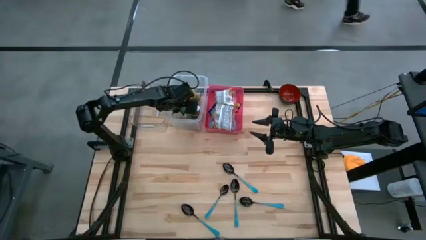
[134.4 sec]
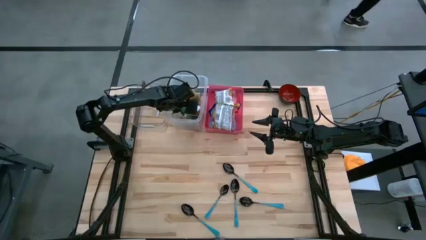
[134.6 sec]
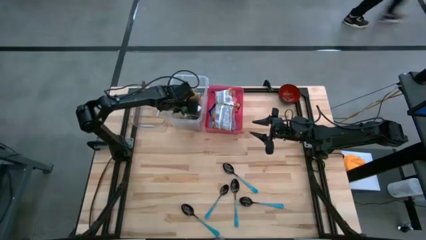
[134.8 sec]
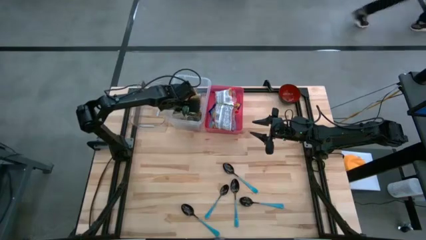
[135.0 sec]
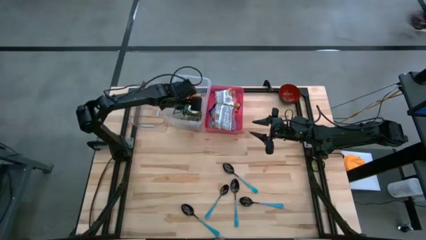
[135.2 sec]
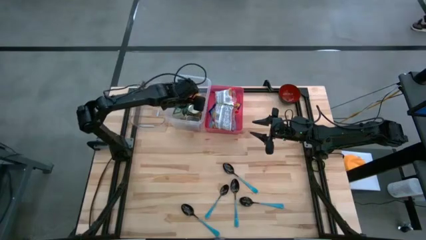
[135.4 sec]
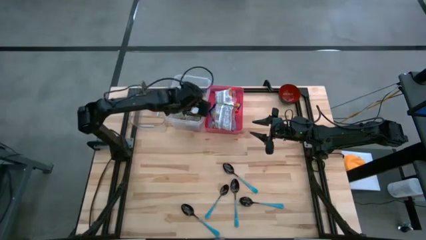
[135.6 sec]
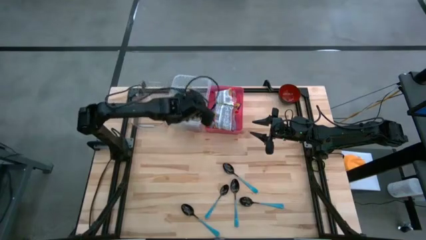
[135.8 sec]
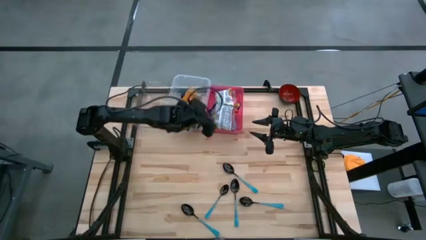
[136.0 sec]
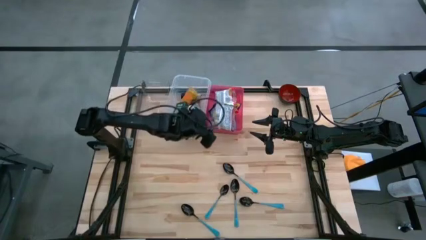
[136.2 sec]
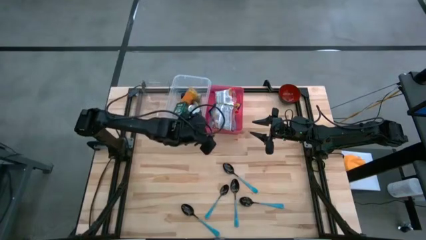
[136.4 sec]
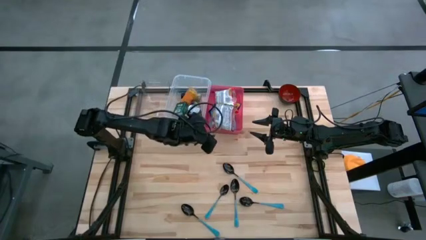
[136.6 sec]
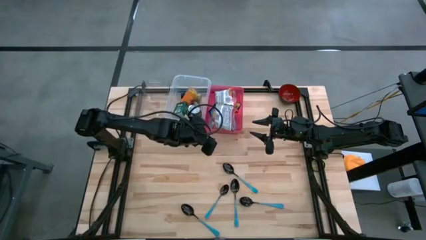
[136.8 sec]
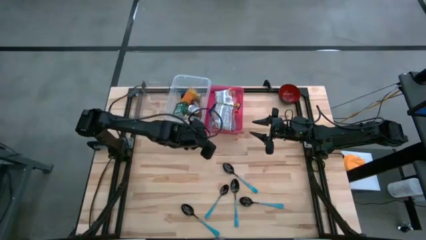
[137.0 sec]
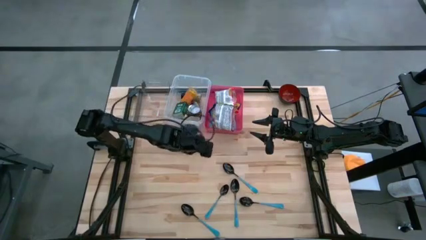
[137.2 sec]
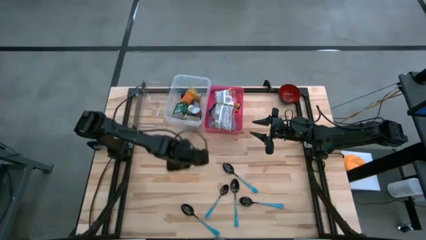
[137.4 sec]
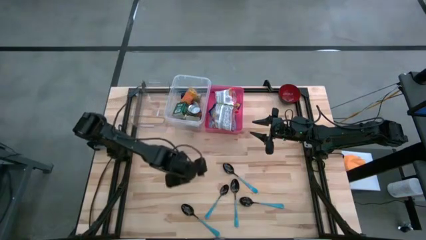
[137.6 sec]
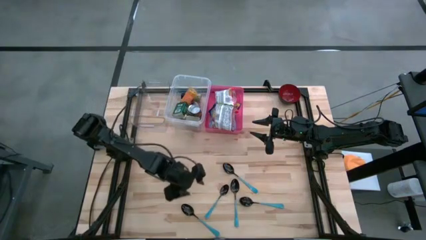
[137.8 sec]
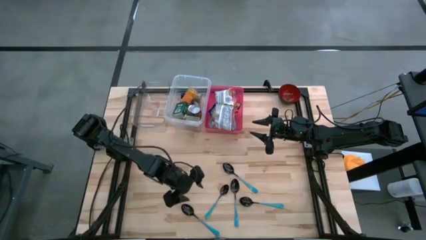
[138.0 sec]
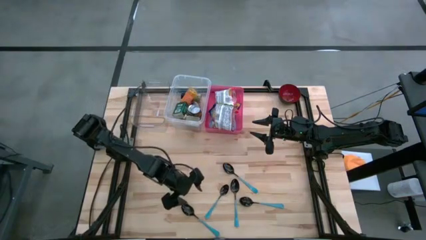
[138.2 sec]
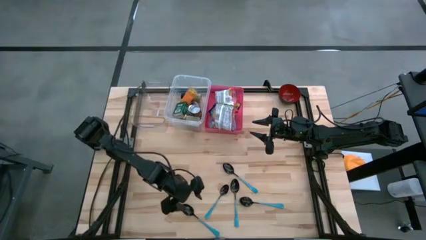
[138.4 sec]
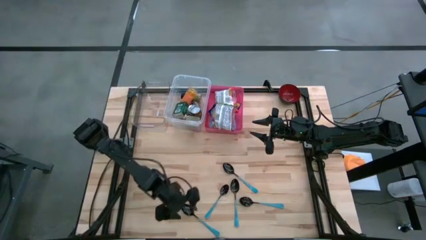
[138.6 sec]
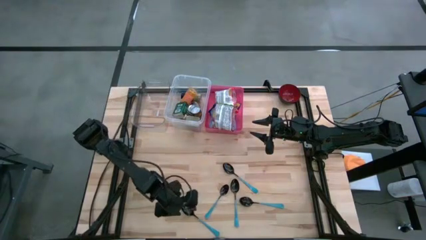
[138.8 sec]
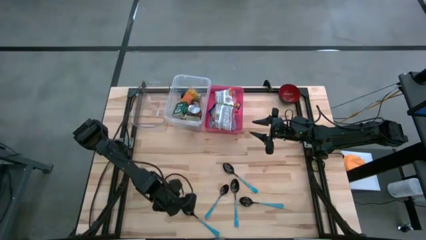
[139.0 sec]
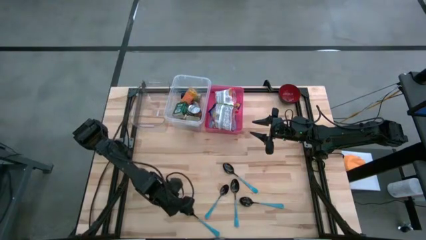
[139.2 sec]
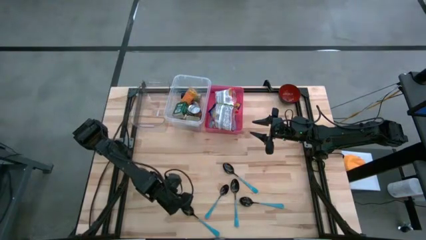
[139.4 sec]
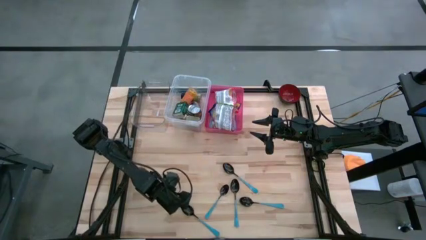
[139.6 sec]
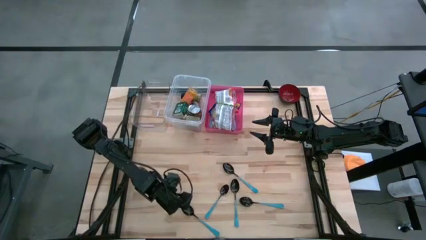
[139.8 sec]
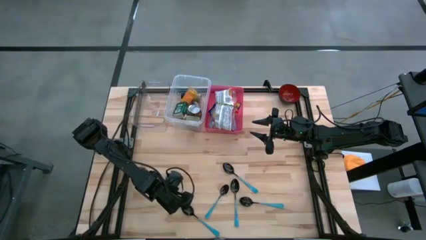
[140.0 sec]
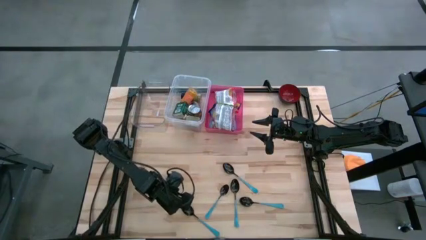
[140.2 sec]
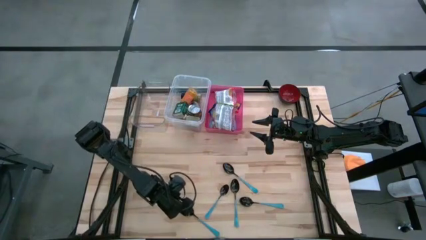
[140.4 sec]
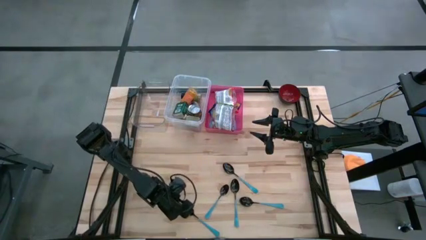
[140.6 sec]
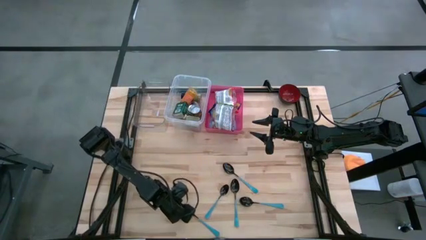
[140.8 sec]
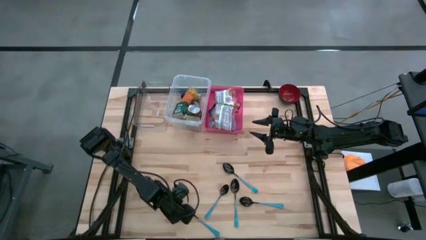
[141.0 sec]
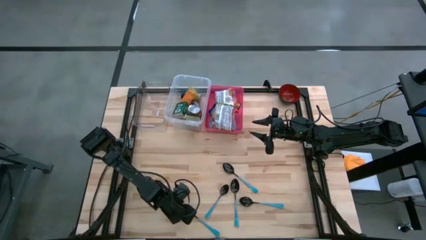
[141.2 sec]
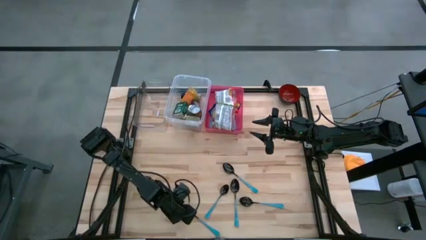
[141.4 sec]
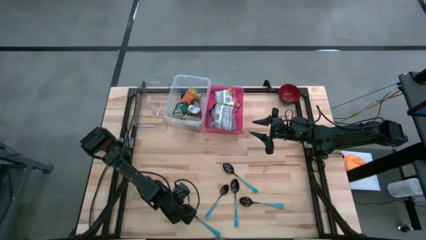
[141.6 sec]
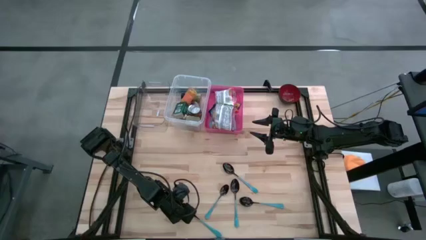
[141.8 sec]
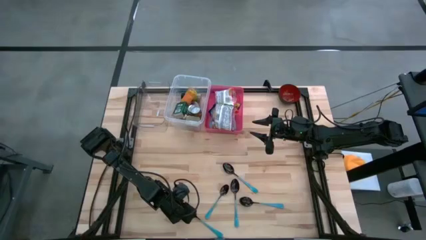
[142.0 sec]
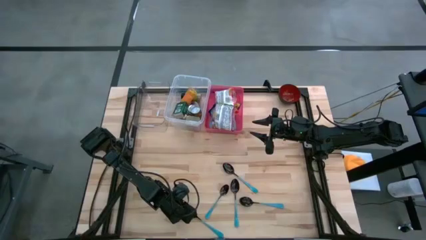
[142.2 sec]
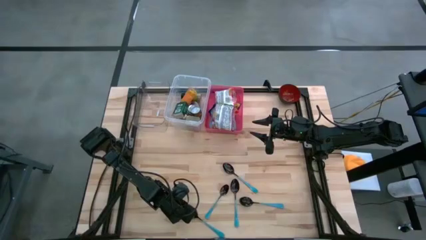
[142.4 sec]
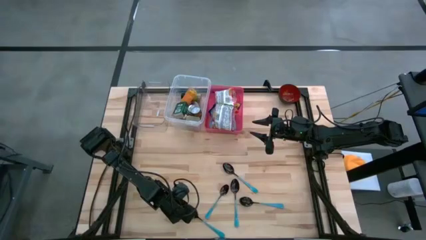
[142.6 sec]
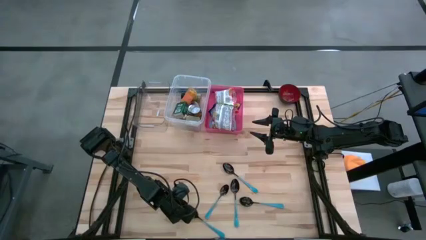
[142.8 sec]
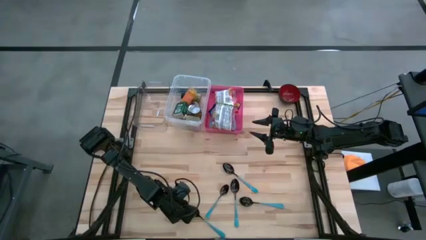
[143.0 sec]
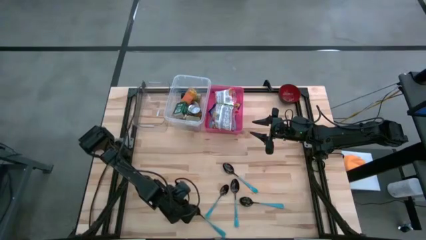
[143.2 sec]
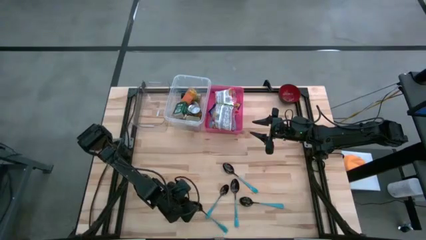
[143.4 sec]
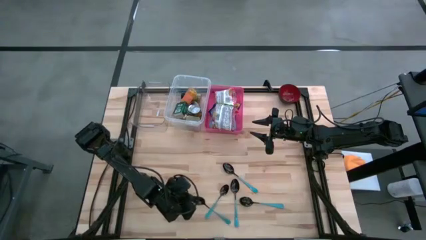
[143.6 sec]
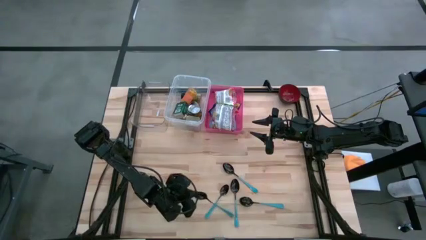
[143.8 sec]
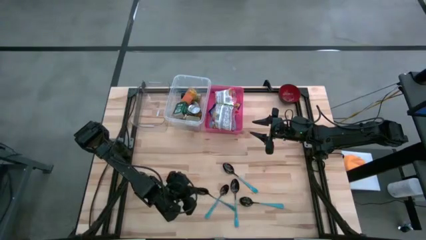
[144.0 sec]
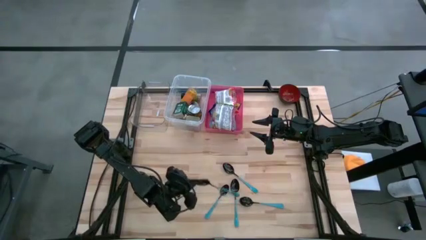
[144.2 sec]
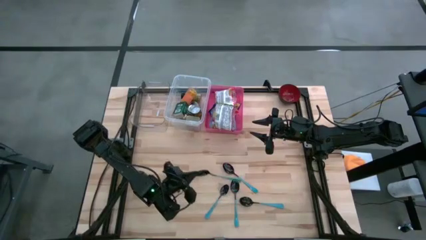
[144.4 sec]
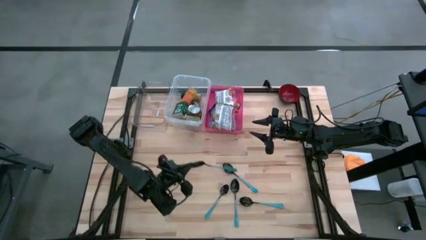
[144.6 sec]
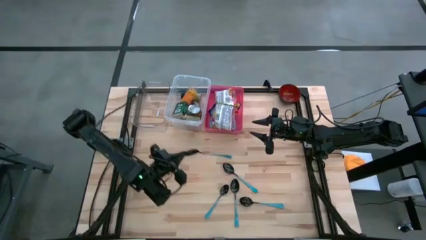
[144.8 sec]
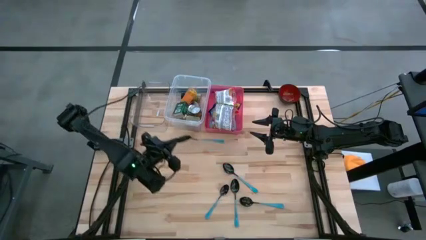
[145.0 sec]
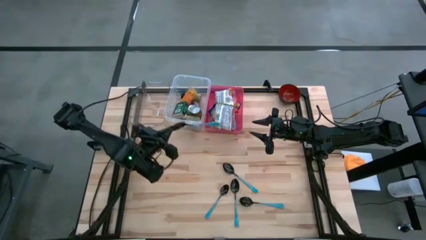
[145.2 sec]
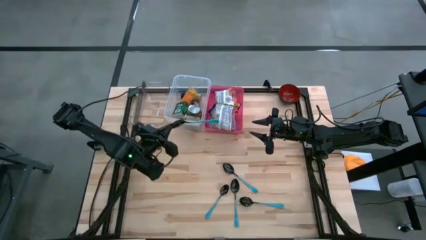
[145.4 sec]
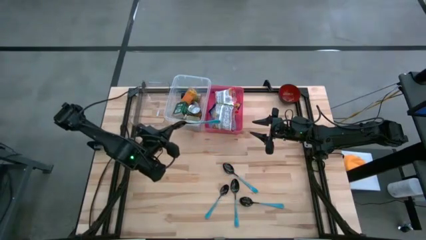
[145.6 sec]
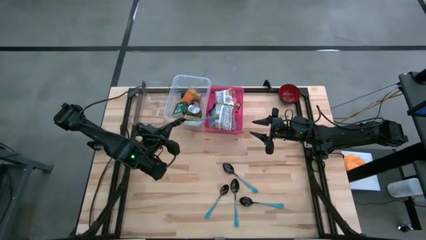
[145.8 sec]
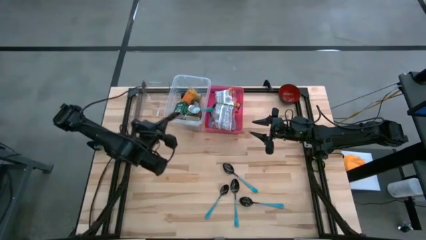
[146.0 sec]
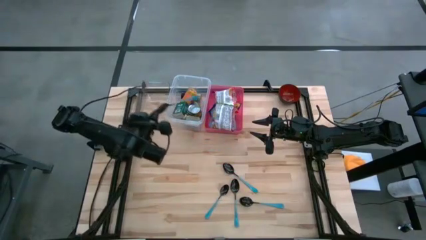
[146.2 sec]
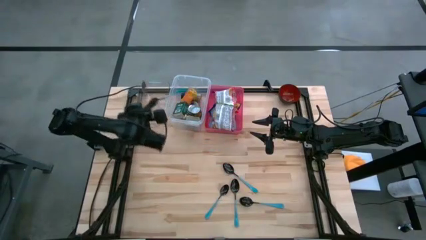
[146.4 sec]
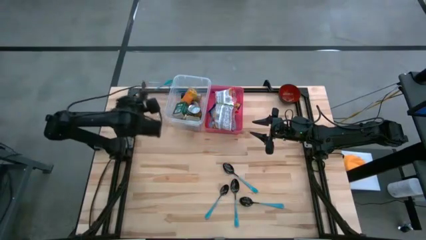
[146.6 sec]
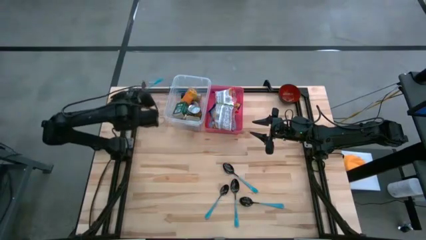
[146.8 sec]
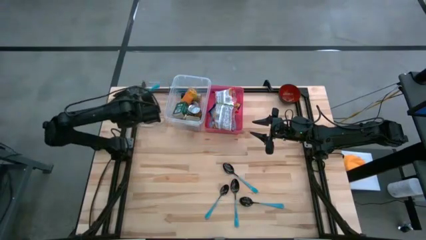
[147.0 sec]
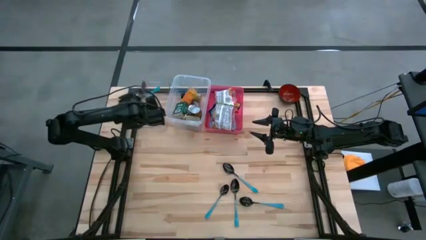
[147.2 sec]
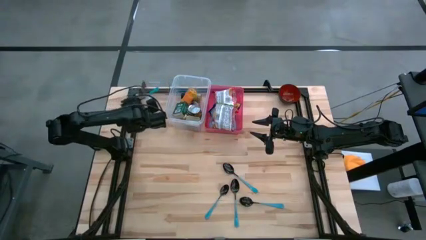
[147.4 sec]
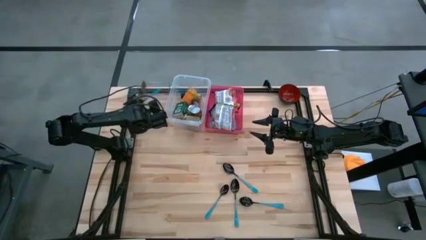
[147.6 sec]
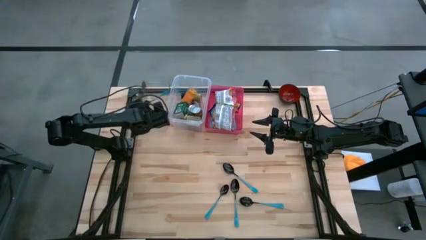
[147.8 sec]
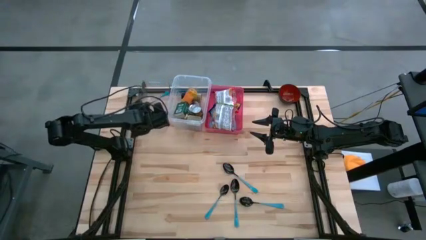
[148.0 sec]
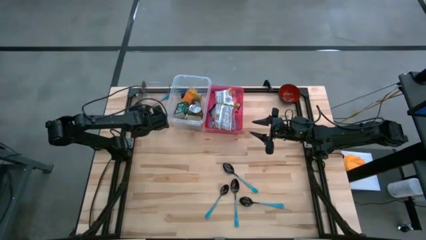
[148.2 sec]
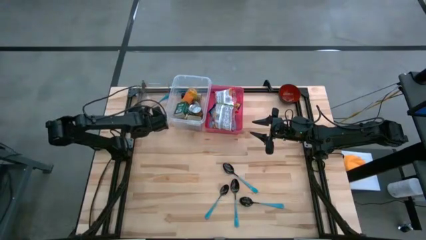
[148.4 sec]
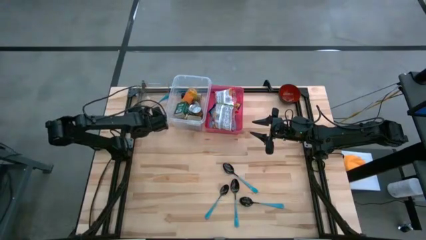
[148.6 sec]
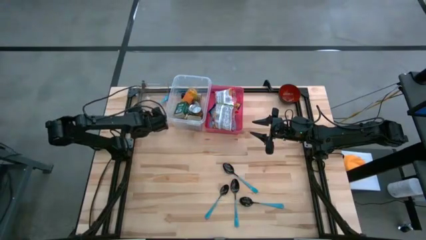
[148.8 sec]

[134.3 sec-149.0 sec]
Put the blue spoon into the left transparent bin
